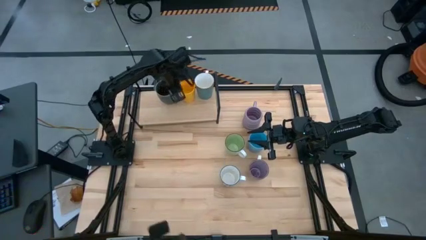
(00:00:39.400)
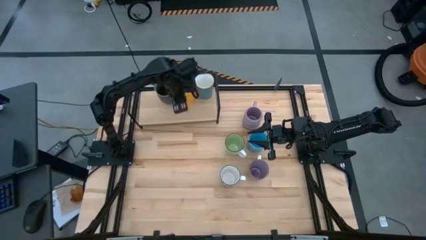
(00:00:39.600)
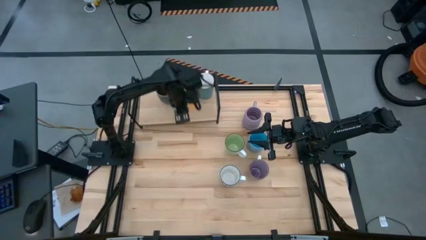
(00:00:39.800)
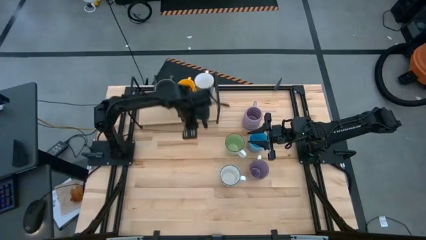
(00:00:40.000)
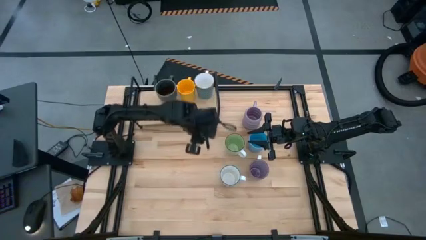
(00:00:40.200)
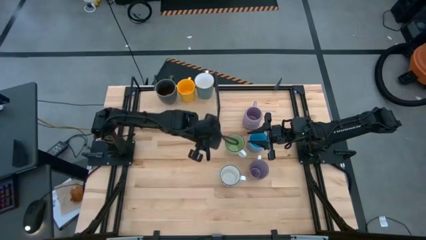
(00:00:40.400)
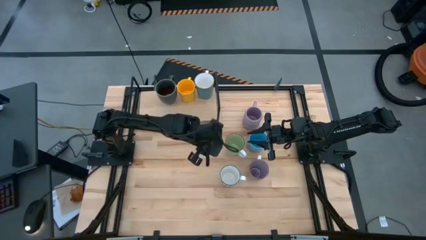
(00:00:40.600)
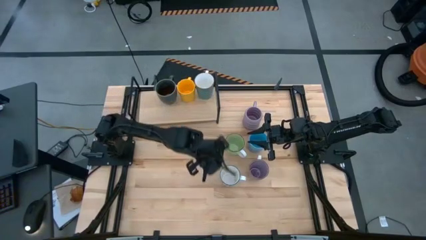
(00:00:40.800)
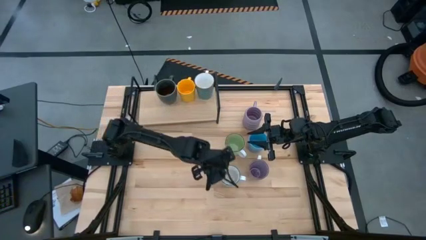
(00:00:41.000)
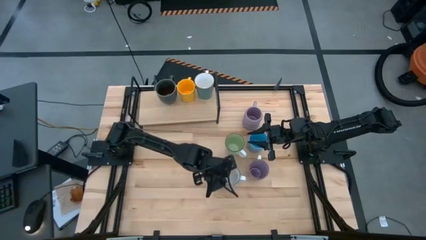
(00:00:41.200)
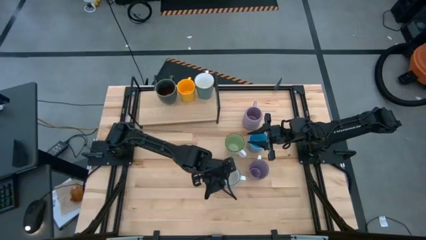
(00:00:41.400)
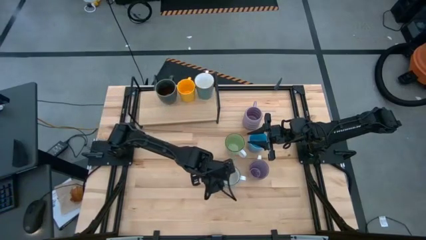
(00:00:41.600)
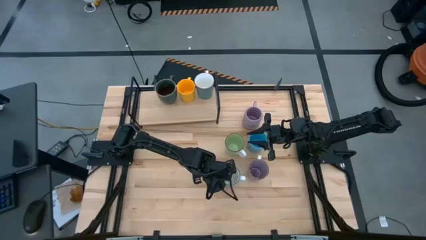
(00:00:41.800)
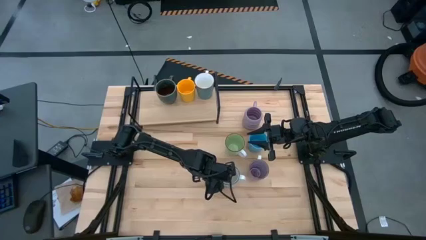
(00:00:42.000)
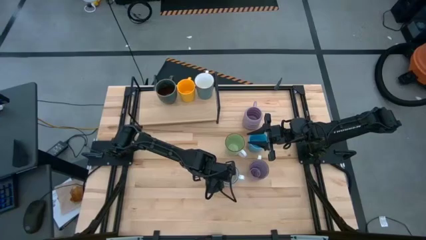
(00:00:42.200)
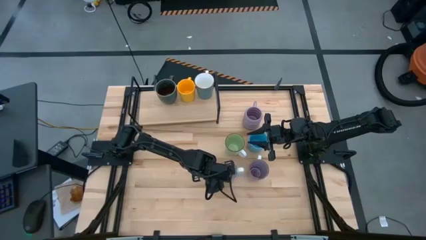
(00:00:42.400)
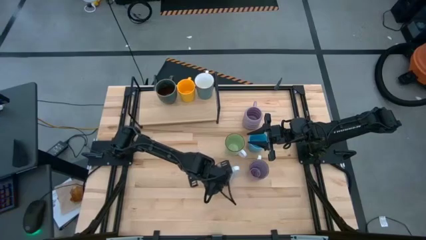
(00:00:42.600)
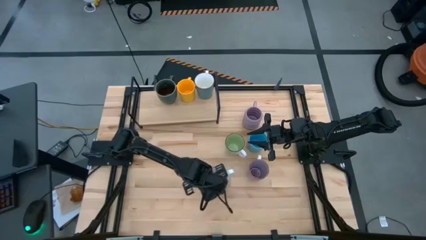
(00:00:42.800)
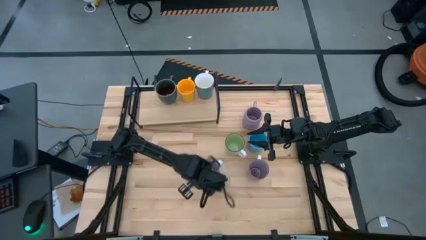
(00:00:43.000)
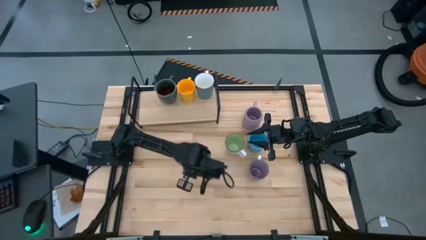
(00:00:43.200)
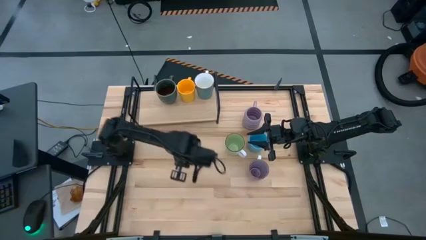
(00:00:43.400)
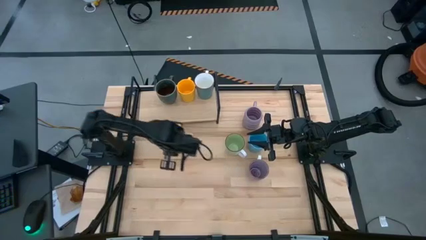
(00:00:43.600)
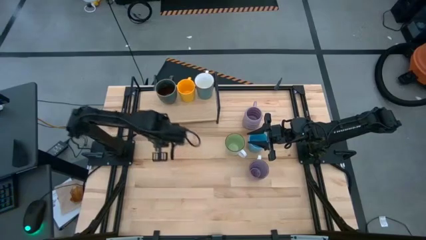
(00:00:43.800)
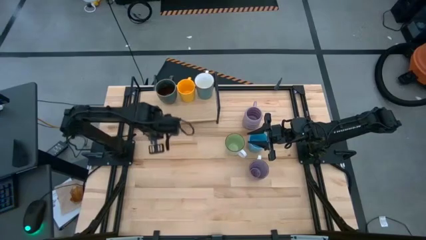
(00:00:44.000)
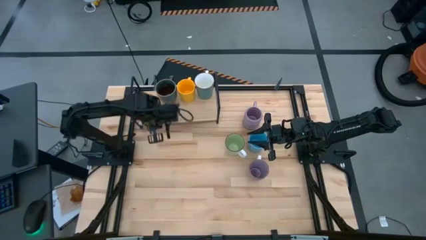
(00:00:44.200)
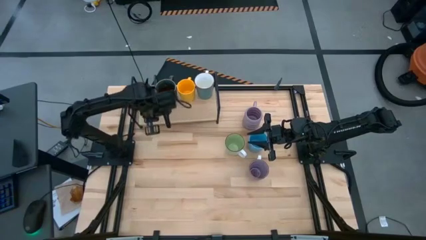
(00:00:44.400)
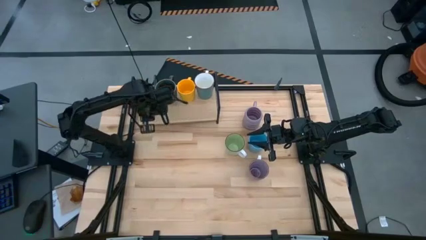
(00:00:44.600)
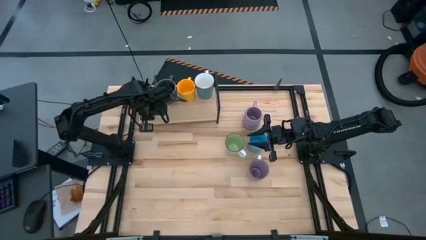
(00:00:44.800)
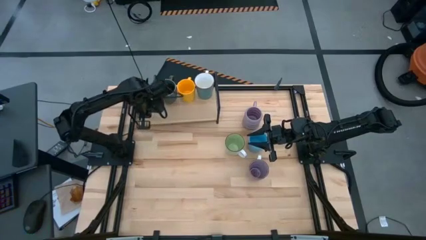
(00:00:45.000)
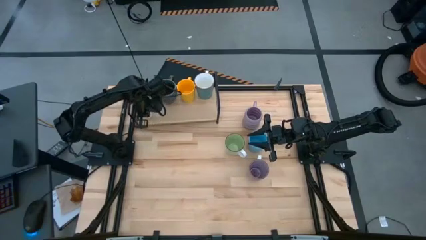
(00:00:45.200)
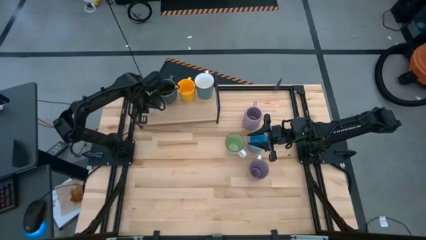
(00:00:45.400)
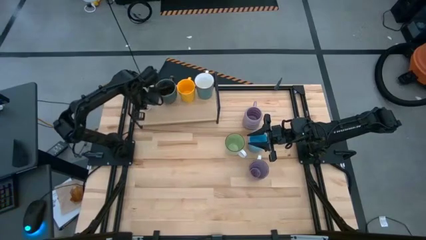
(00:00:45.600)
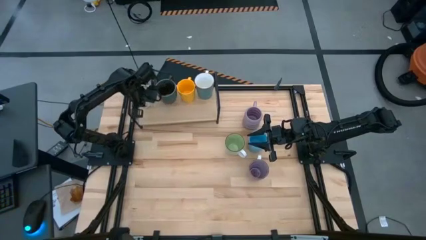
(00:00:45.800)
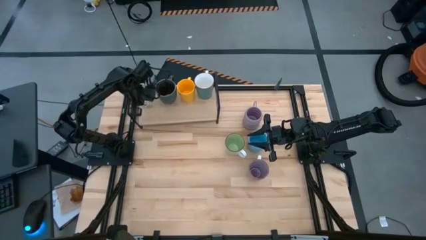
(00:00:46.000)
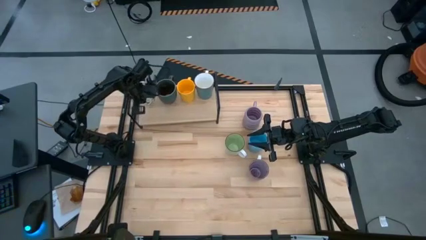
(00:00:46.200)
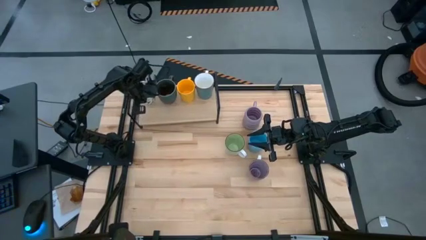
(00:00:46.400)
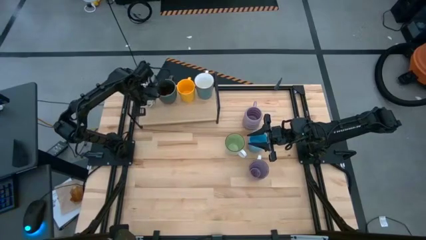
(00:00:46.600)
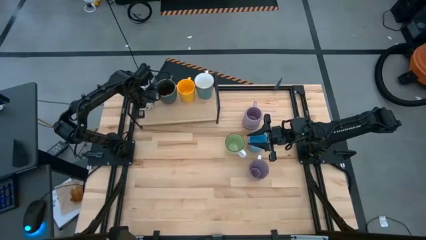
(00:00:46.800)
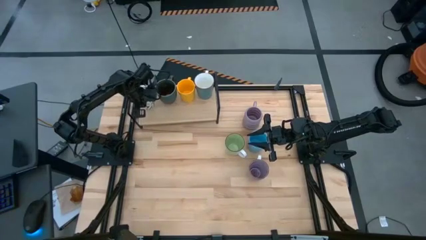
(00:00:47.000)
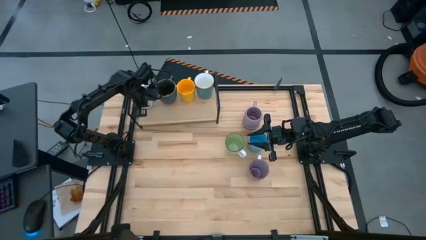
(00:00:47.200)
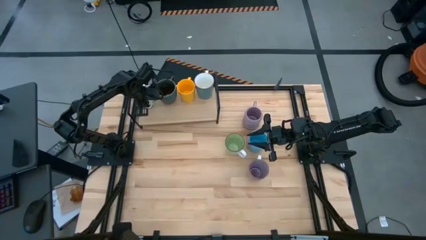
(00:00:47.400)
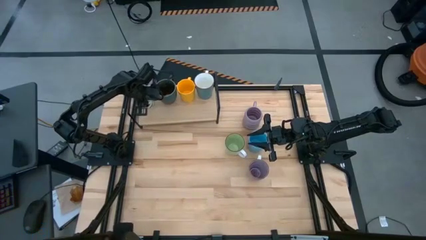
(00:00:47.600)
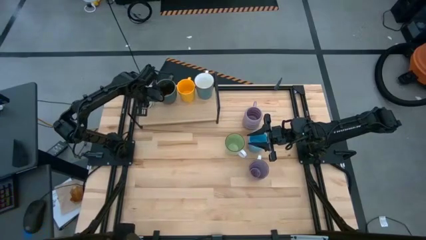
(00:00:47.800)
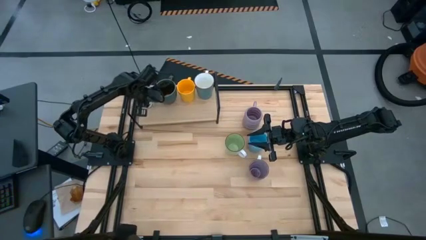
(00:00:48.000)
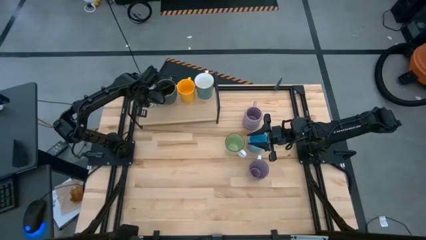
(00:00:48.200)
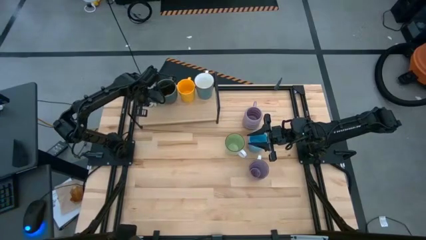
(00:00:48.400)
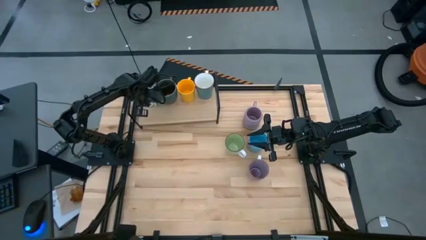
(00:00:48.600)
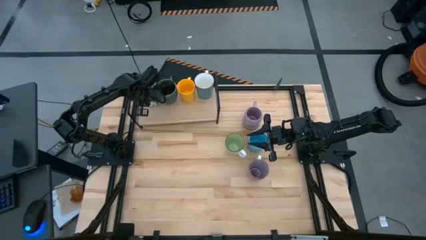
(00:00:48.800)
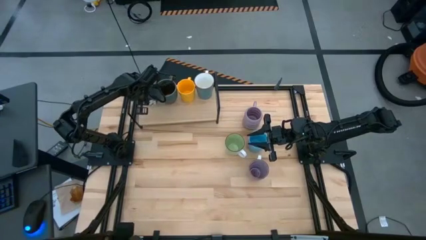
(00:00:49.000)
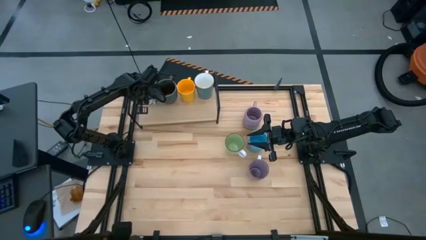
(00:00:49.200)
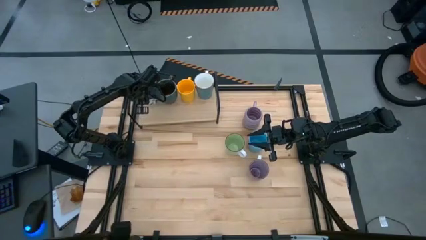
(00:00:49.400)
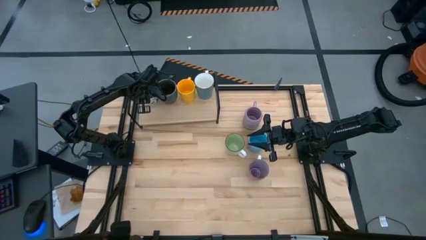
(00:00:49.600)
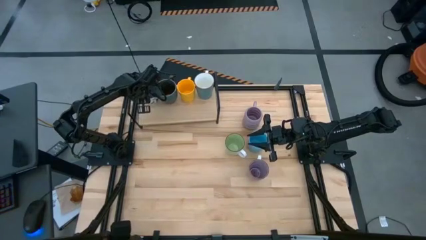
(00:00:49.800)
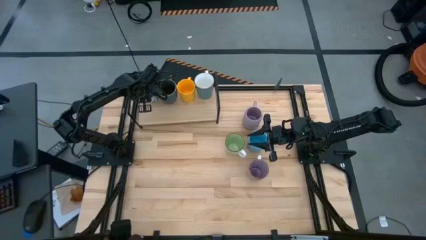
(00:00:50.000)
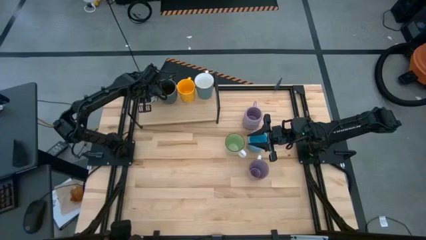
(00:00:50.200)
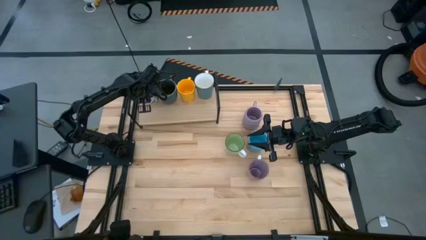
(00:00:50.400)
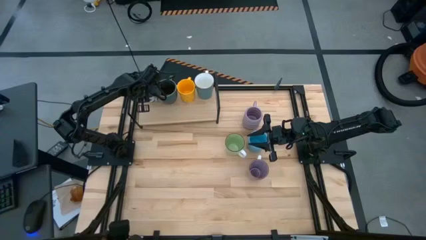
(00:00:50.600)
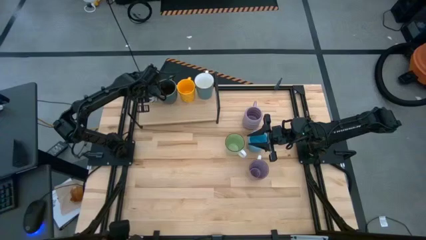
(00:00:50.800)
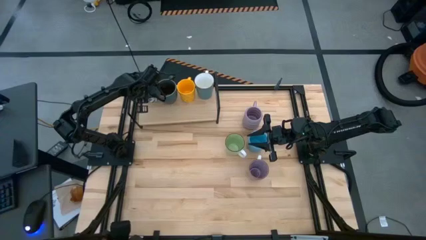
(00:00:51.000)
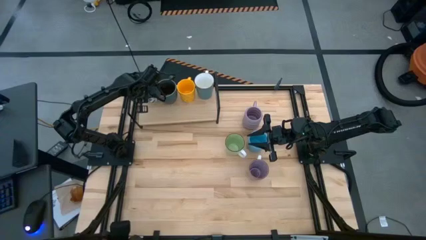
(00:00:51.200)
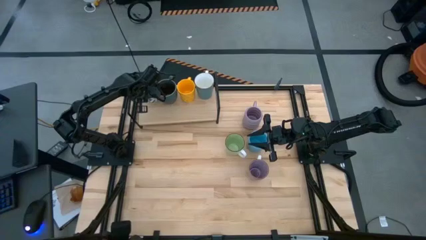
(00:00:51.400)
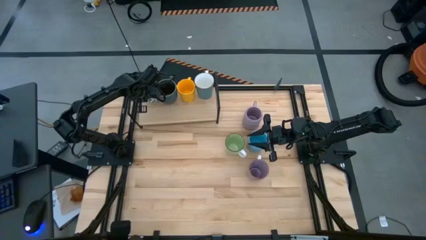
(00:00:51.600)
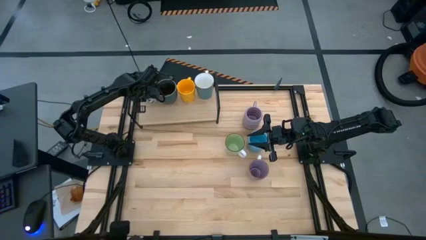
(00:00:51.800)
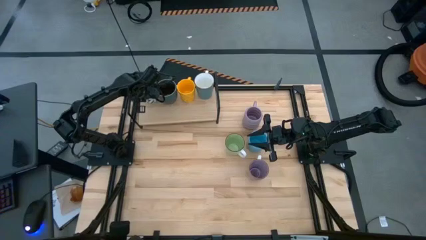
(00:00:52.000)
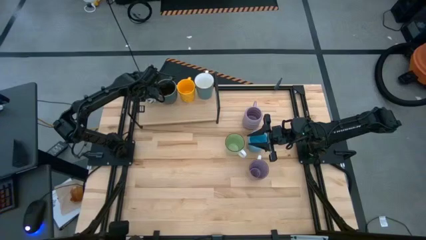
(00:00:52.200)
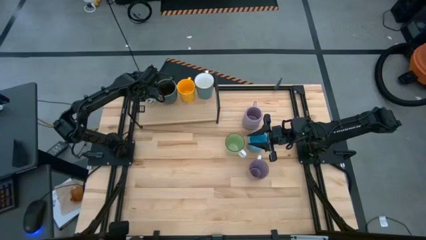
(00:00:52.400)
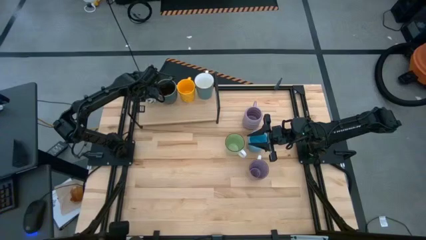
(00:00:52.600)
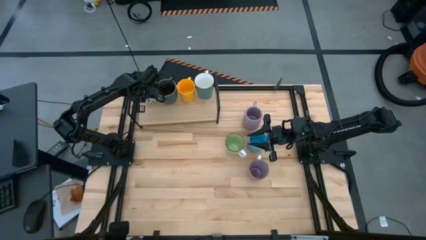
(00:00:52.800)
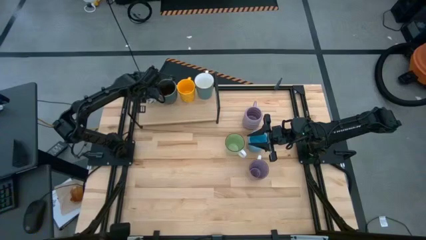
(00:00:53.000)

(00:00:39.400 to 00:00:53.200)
Task: Place coffee mugs
Put the blue and white mug on the shelf
